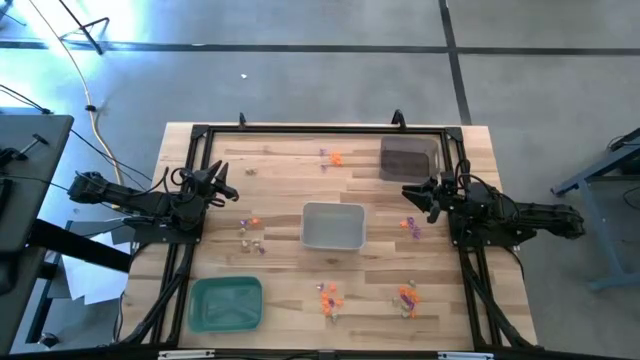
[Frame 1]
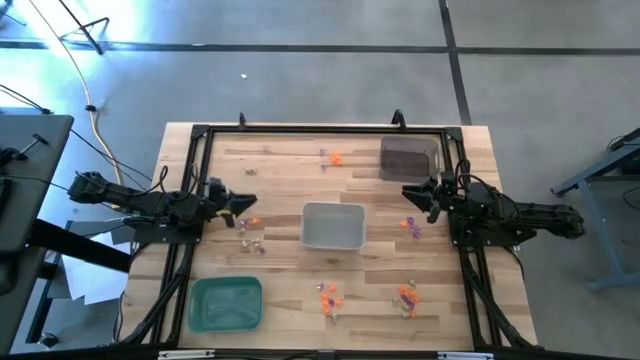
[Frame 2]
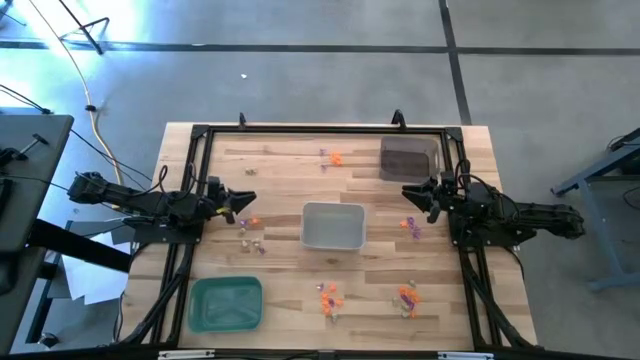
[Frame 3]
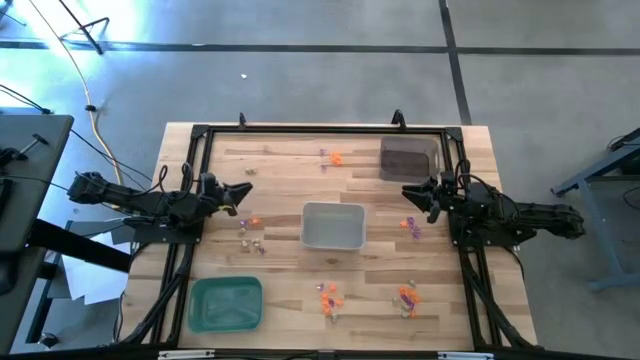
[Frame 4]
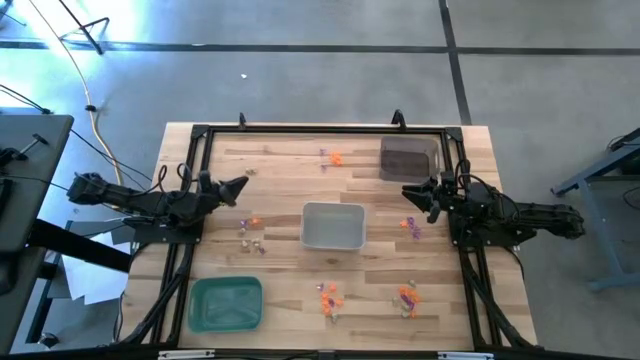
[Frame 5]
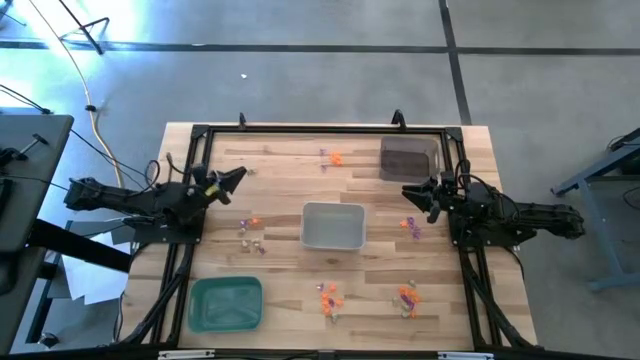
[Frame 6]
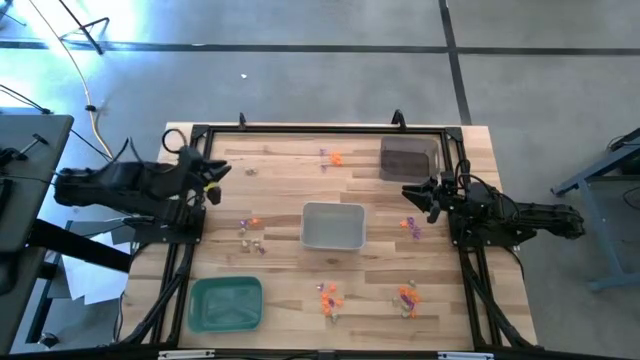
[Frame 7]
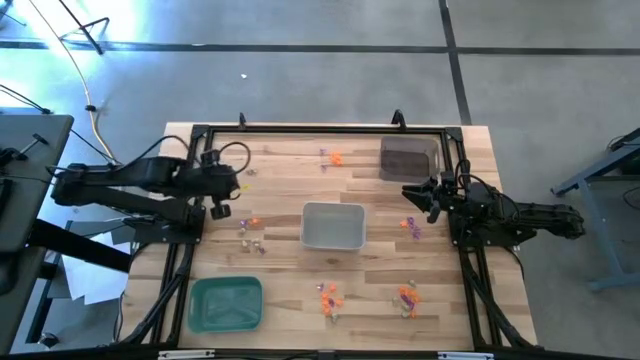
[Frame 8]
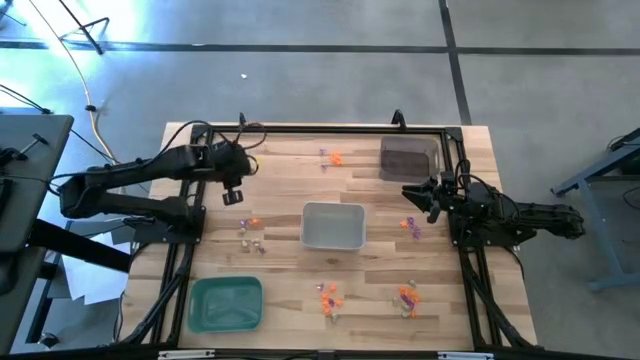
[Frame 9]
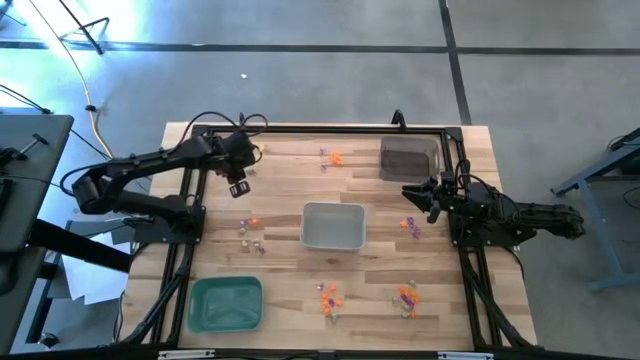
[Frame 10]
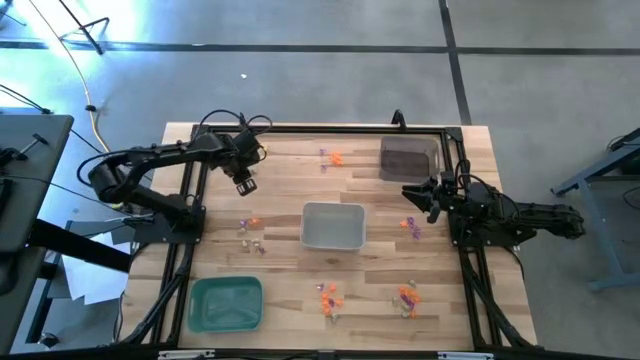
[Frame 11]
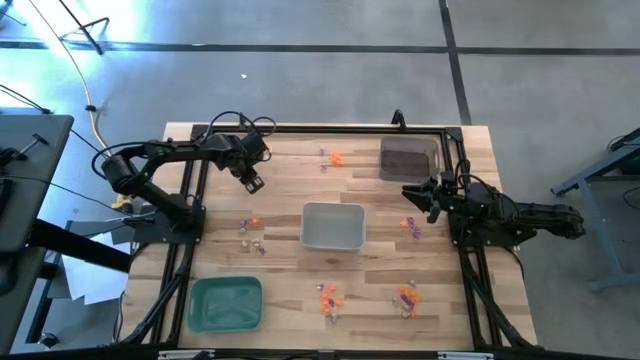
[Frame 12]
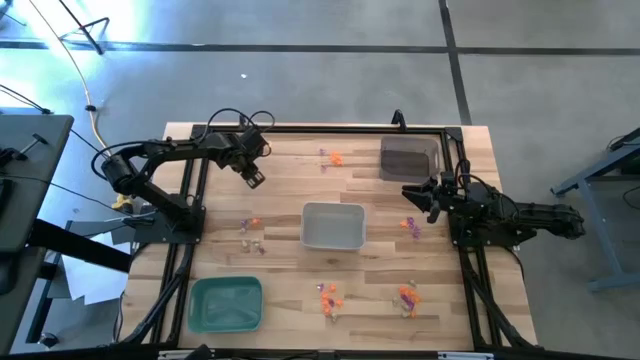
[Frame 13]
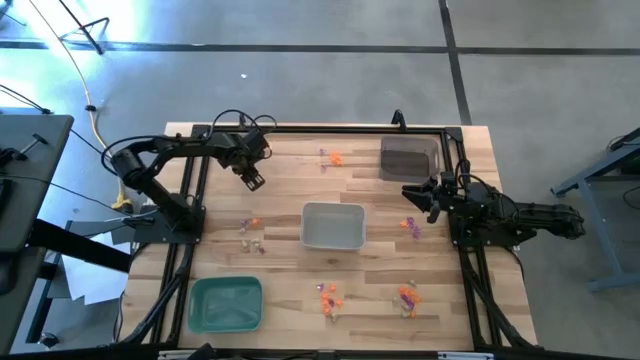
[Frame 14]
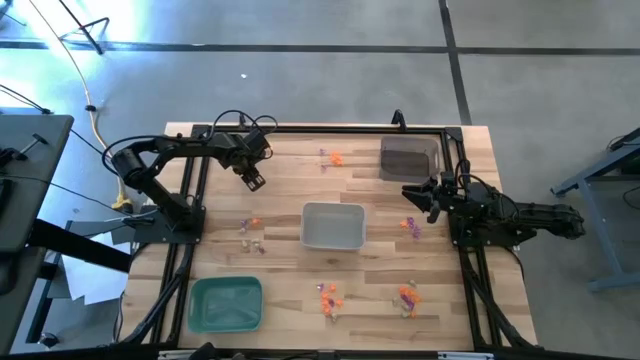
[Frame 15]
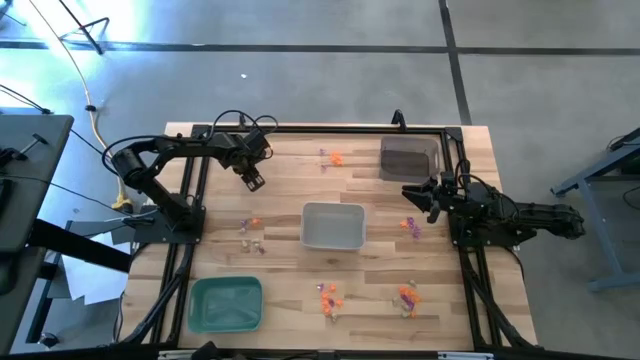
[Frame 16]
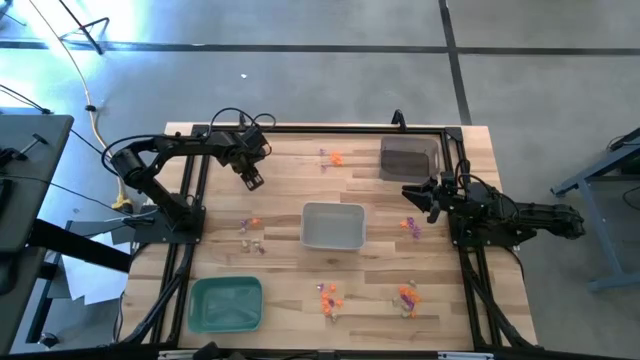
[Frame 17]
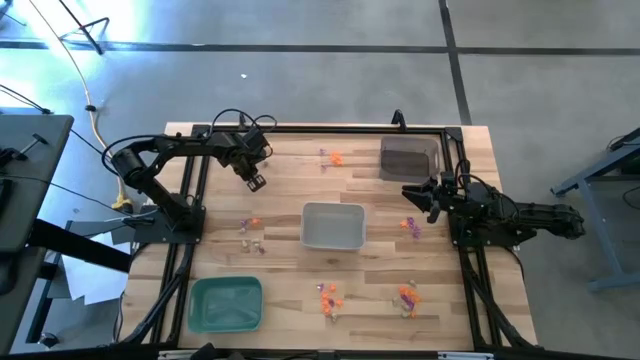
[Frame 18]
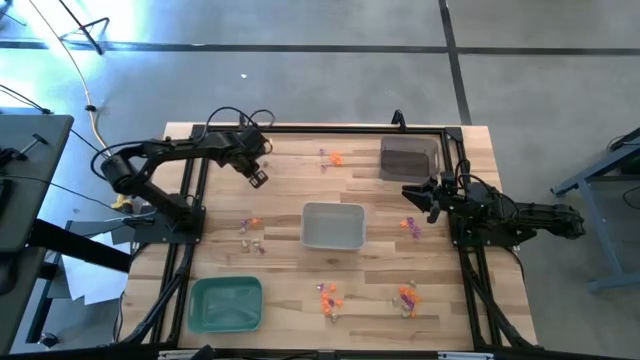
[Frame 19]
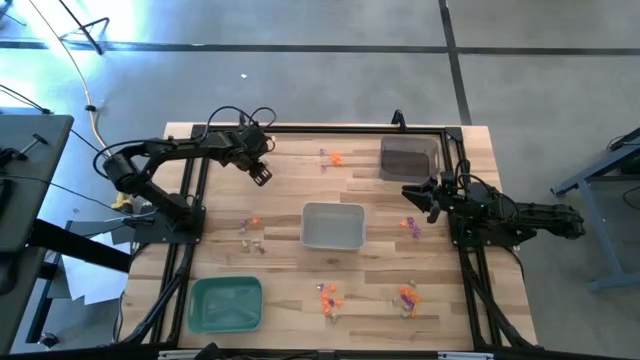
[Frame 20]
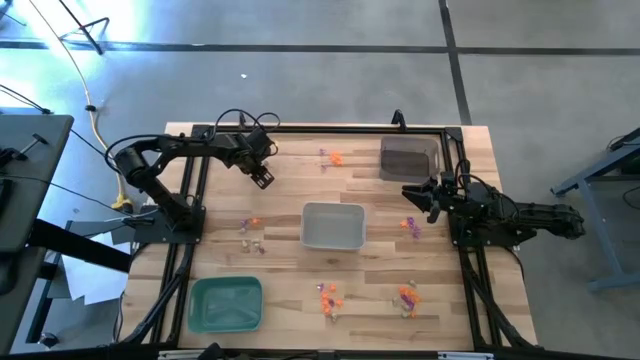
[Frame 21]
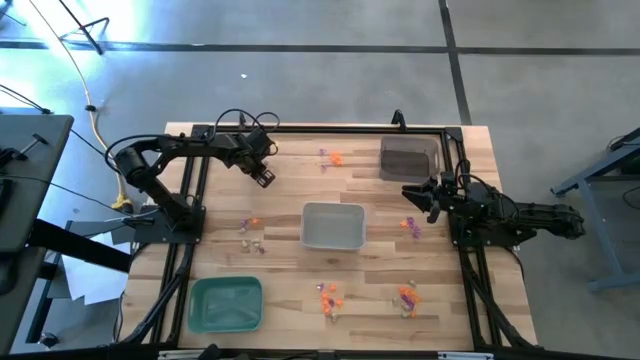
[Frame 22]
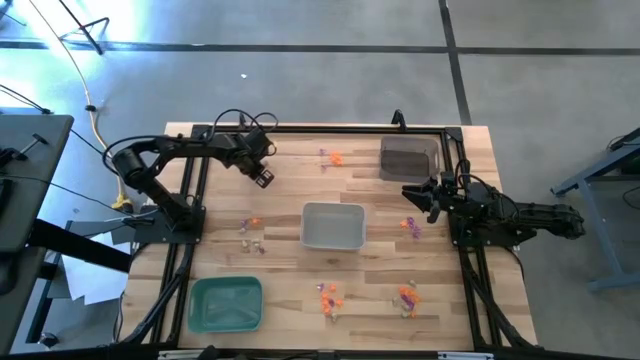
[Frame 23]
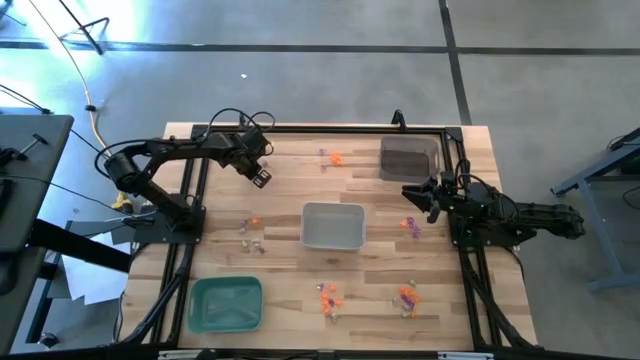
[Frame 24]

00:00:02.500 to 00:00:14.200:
Task: Sort Halloween decoration
Put the white skull toy into the white bin

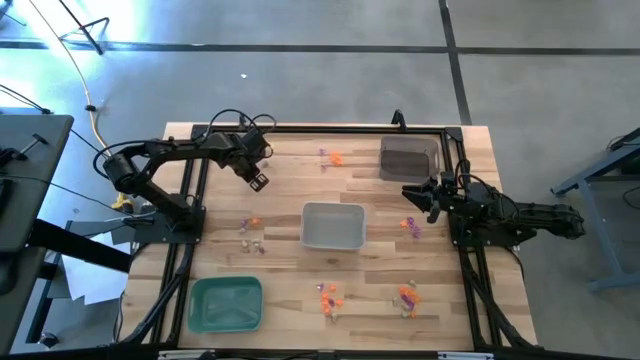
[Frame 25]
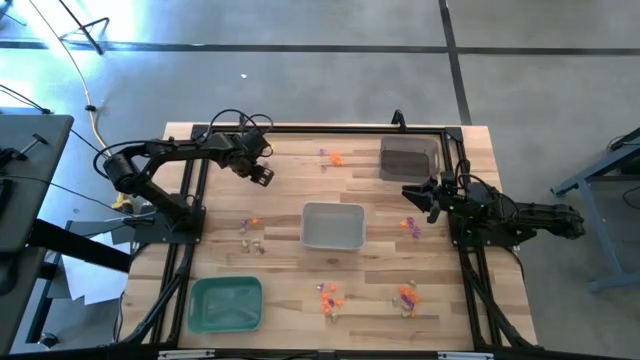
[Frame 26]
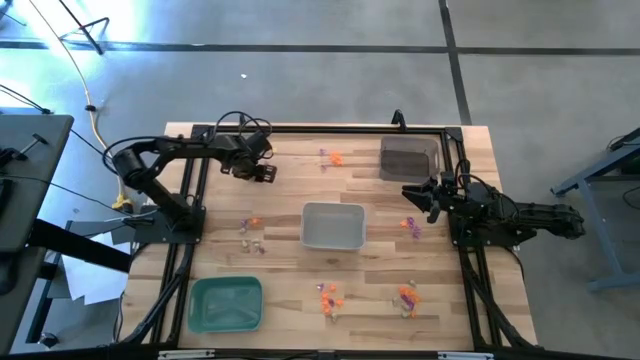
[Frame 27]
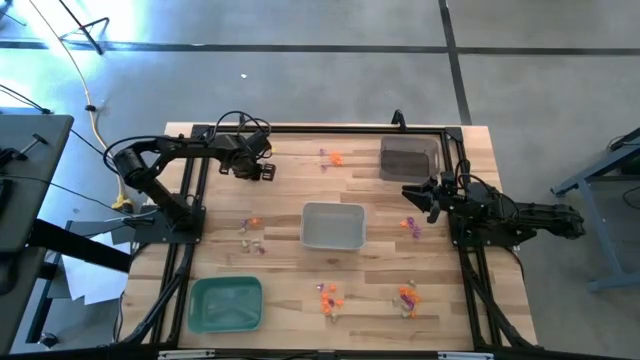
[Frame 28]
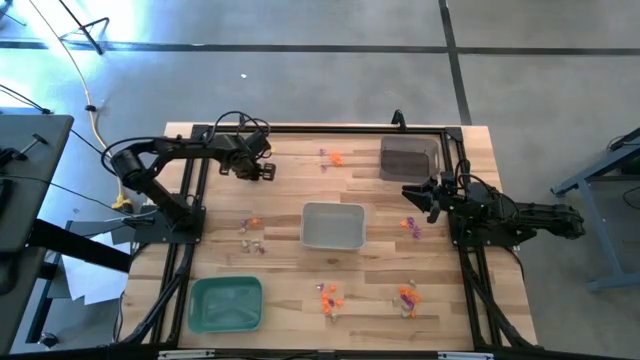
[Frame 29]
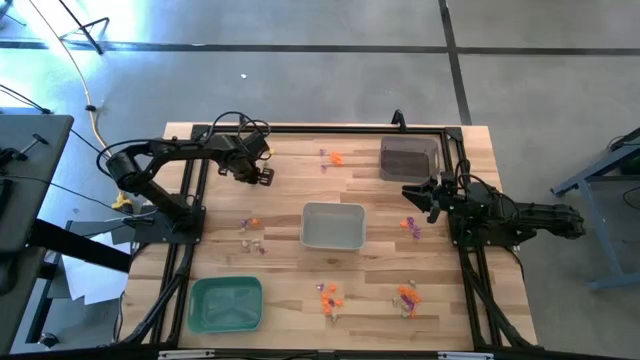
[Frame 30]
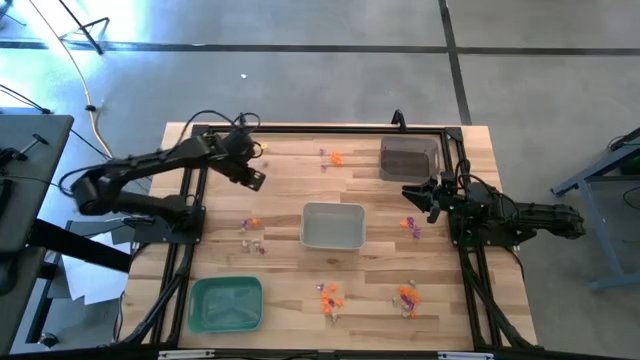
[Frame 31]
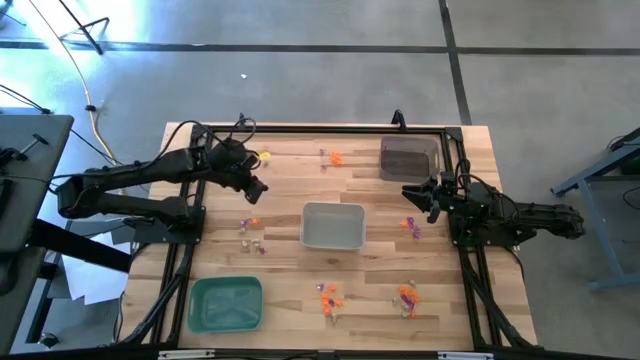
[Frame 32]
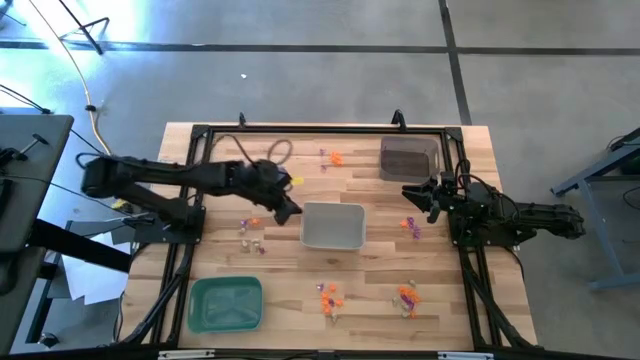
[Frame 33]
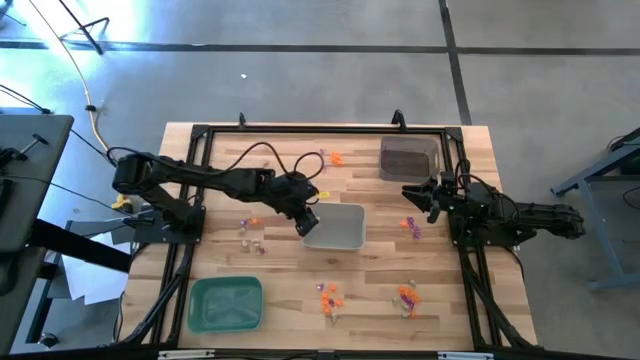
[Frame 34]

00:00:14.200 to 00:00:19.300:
Put the white skull toy into the white bin

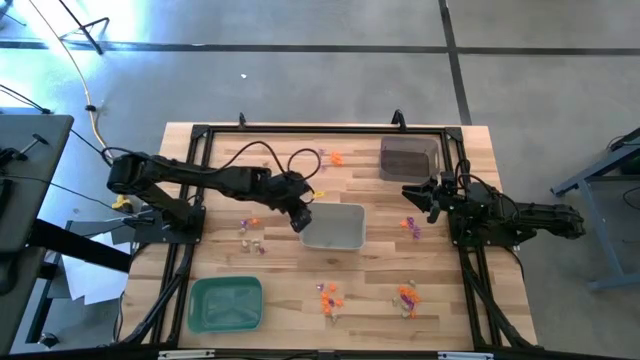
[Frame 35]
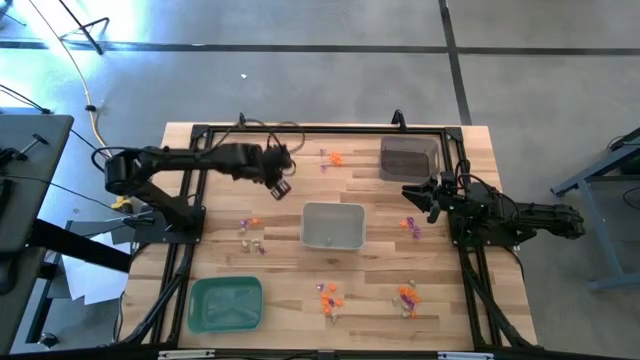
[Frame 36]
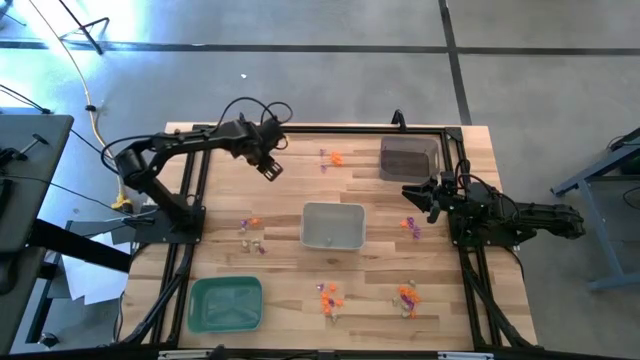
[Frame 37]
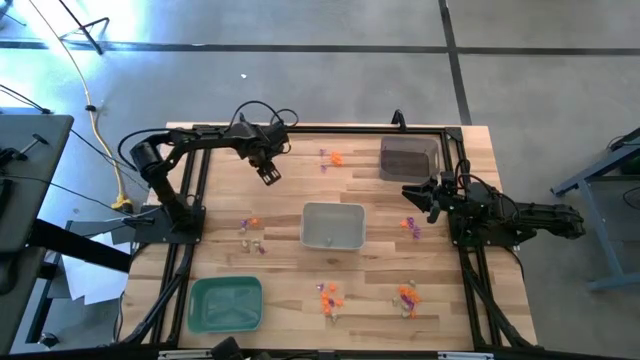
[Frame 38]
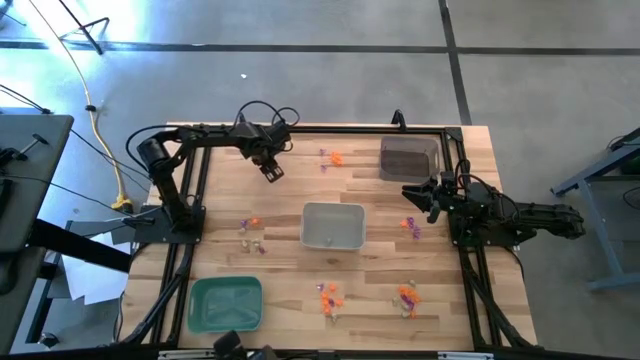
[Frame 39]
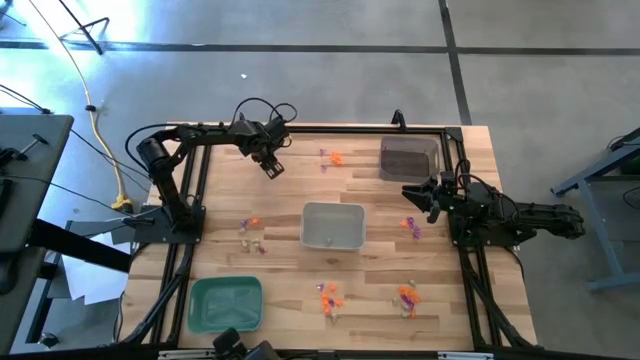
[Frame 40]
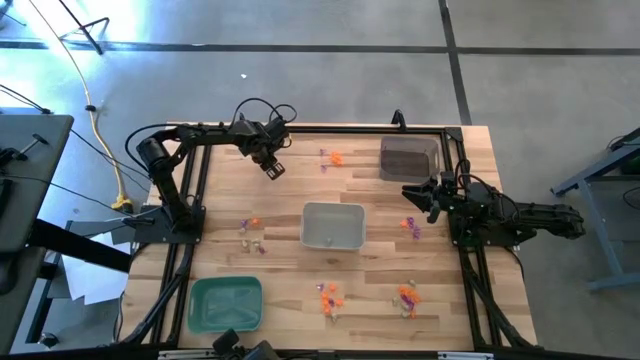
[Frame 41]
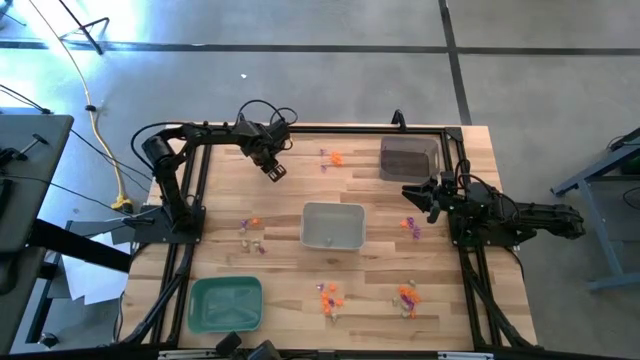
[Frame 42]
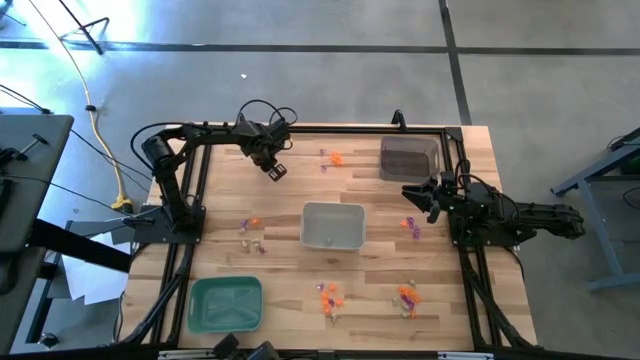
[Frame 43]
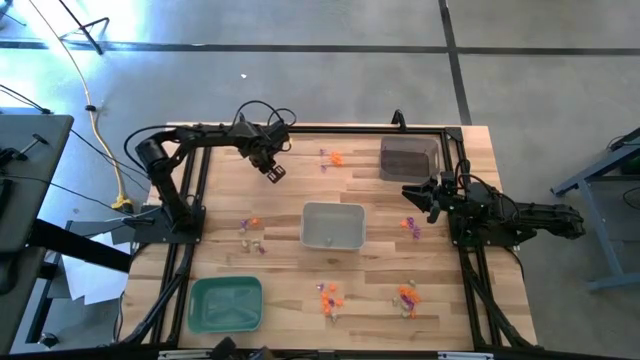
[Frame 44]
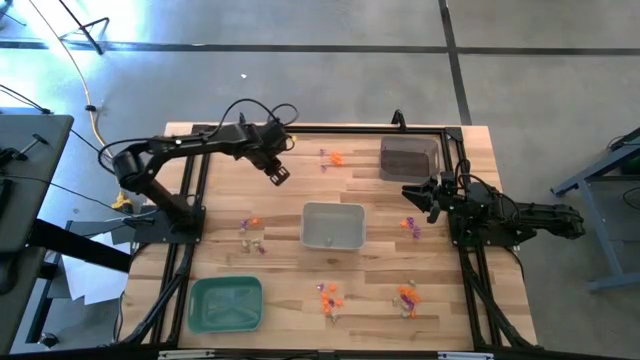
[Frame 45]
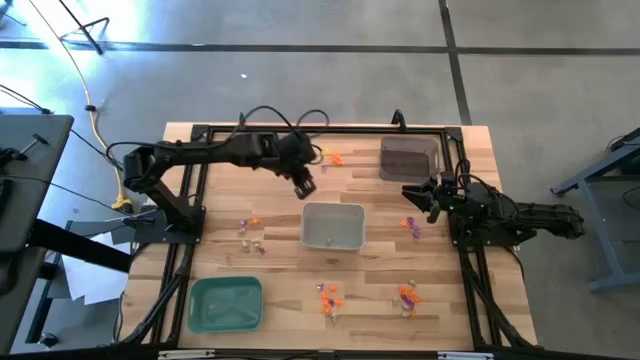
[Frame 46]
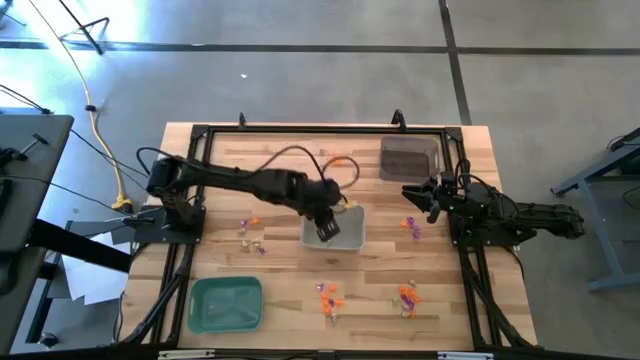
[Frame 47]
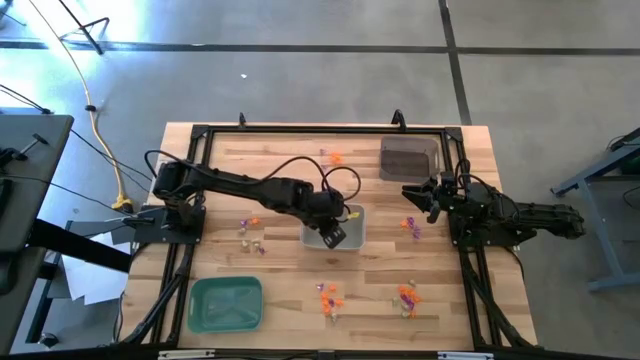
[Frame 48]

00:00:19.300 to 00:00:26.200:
Put the white skull toy into the white bin
